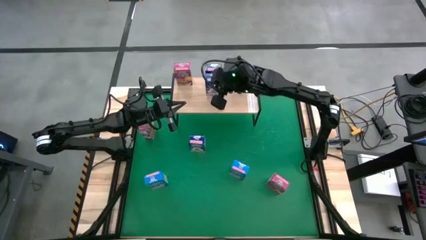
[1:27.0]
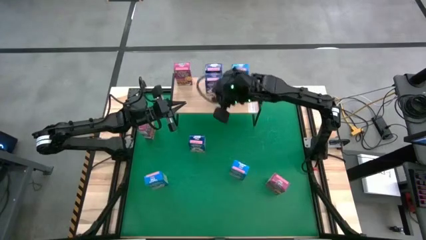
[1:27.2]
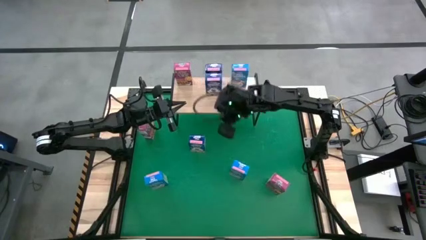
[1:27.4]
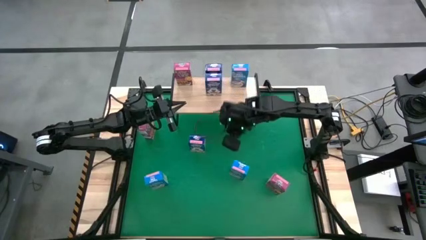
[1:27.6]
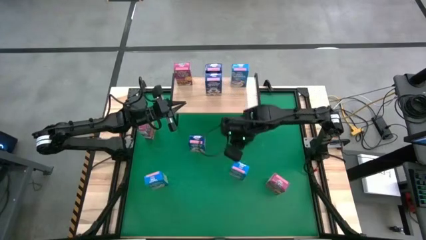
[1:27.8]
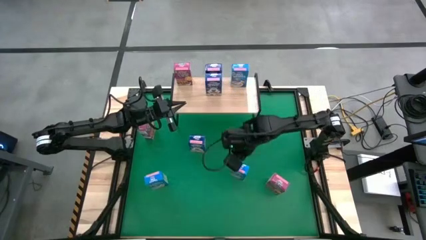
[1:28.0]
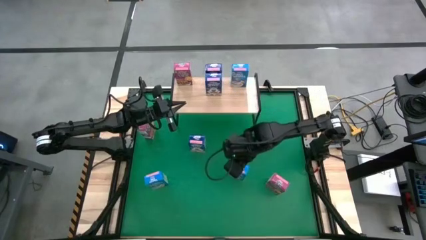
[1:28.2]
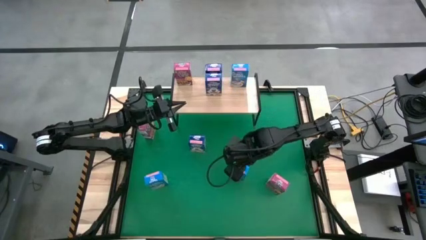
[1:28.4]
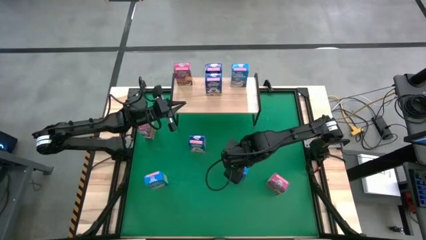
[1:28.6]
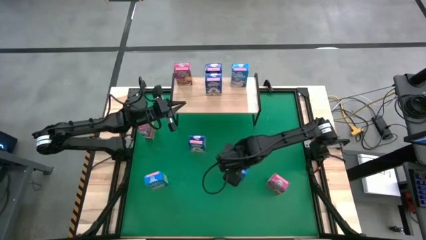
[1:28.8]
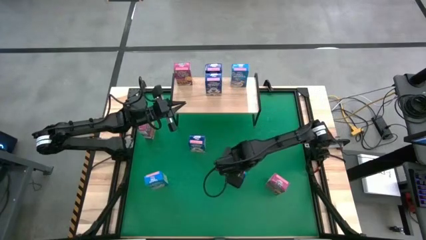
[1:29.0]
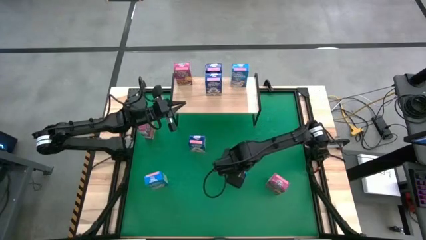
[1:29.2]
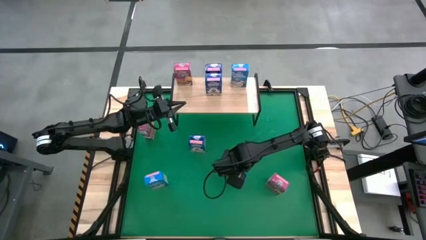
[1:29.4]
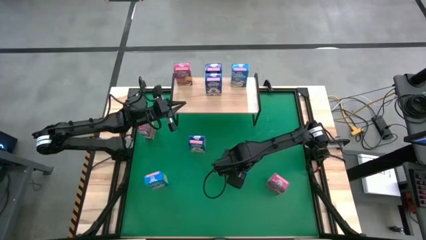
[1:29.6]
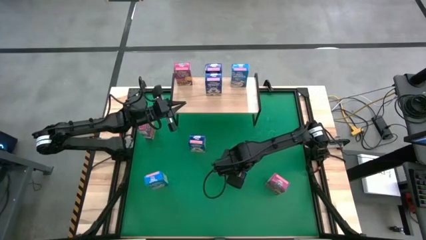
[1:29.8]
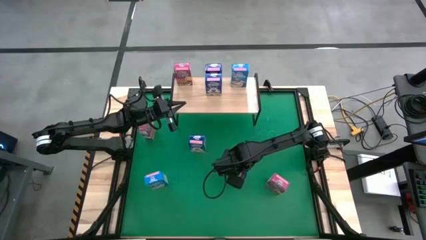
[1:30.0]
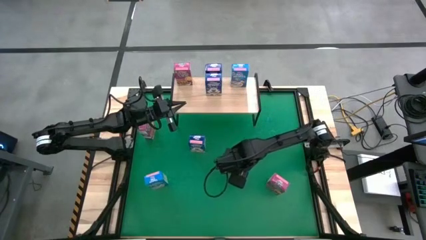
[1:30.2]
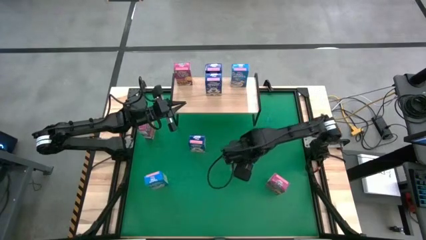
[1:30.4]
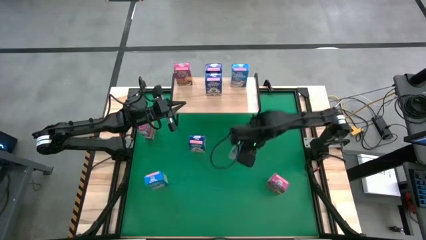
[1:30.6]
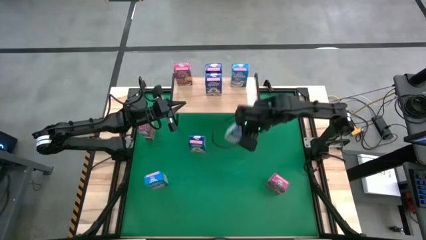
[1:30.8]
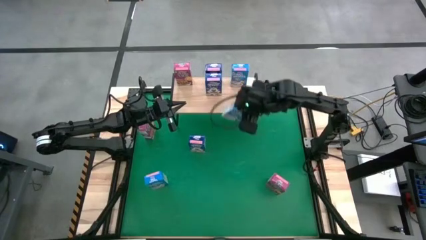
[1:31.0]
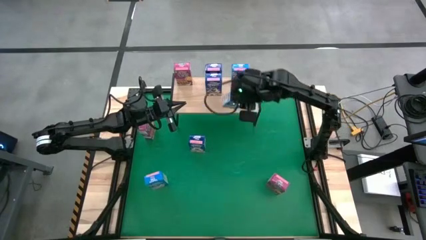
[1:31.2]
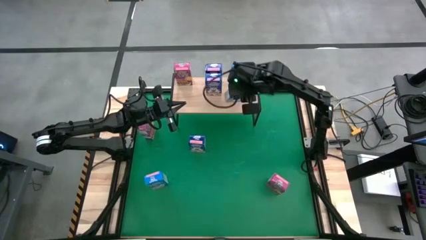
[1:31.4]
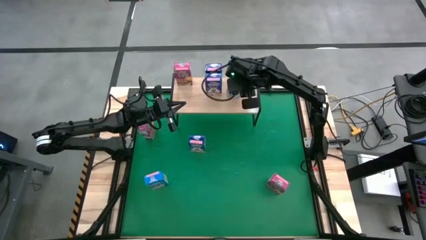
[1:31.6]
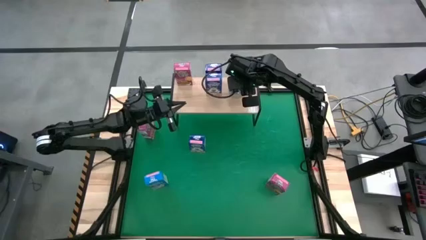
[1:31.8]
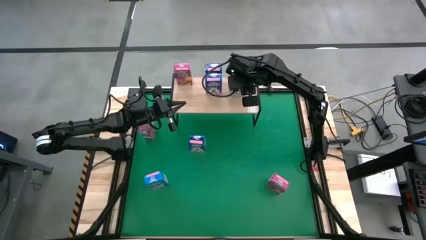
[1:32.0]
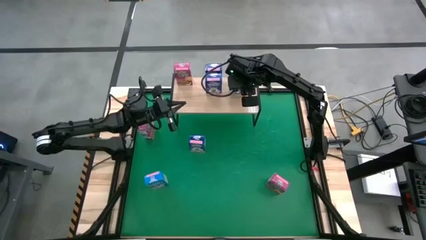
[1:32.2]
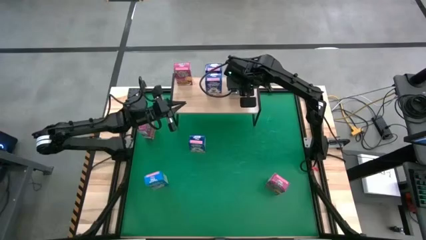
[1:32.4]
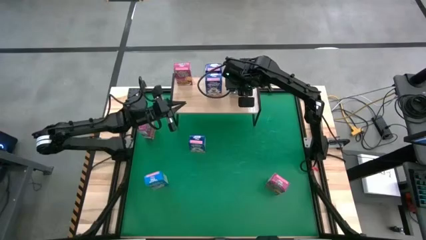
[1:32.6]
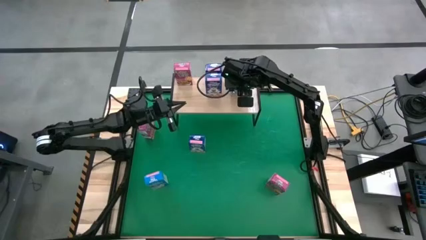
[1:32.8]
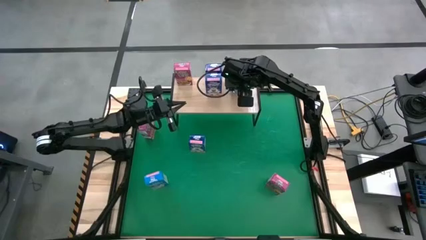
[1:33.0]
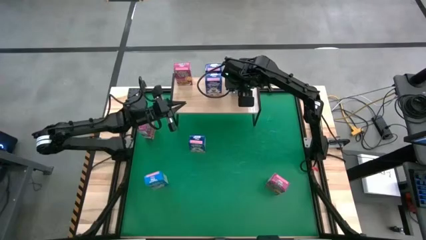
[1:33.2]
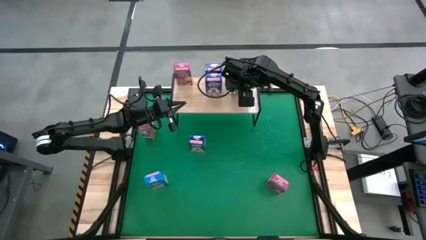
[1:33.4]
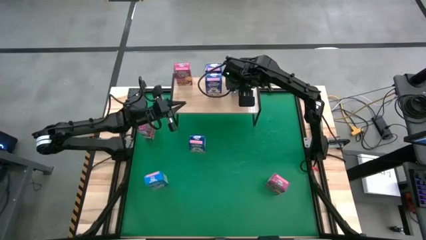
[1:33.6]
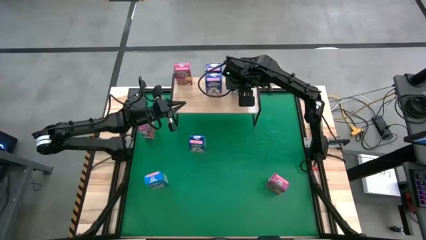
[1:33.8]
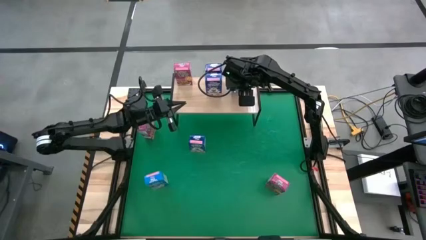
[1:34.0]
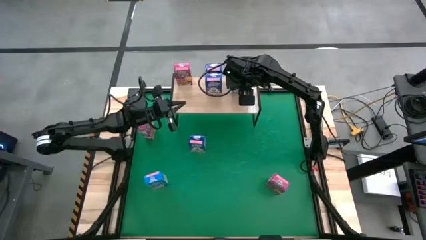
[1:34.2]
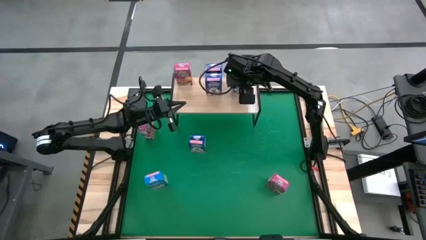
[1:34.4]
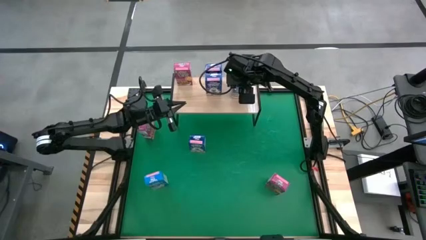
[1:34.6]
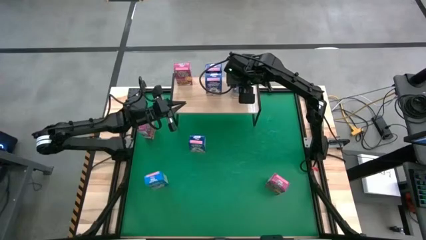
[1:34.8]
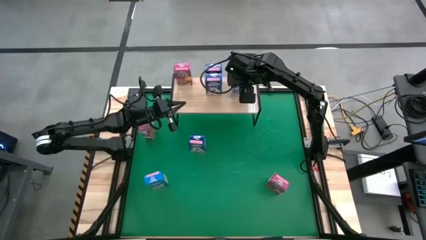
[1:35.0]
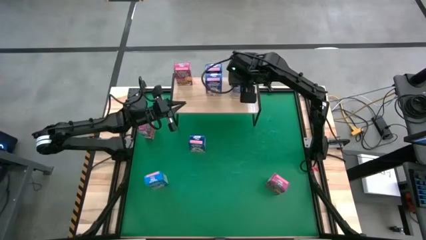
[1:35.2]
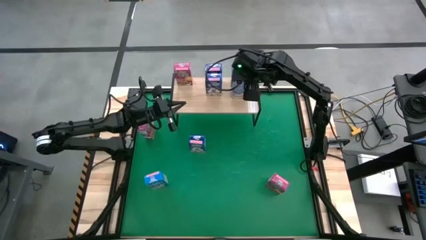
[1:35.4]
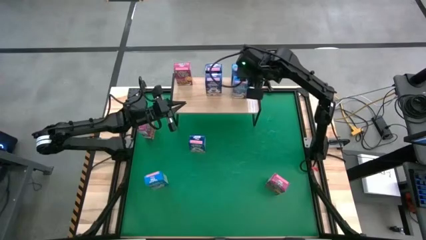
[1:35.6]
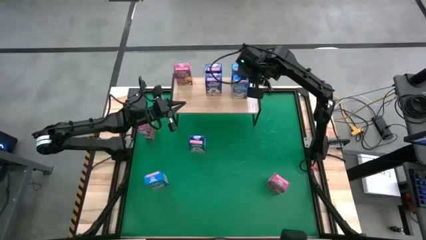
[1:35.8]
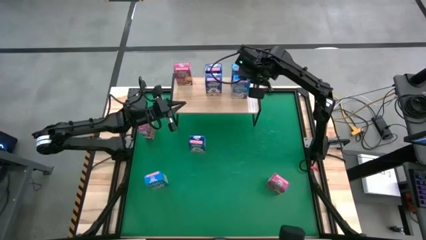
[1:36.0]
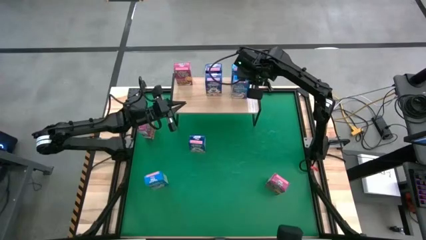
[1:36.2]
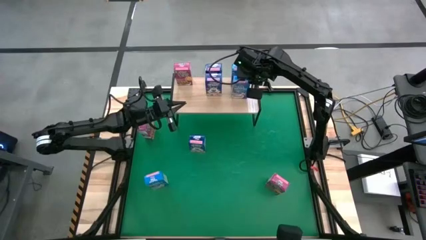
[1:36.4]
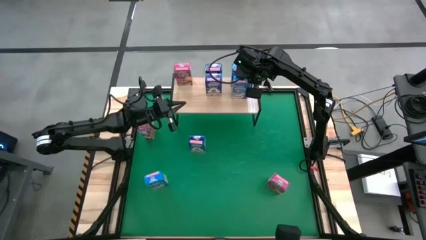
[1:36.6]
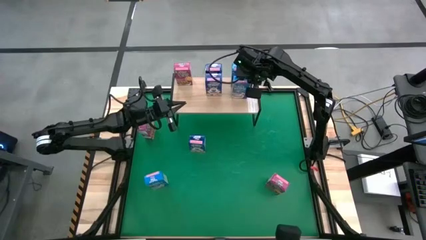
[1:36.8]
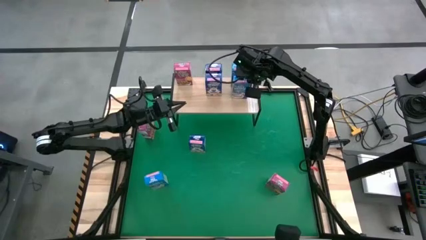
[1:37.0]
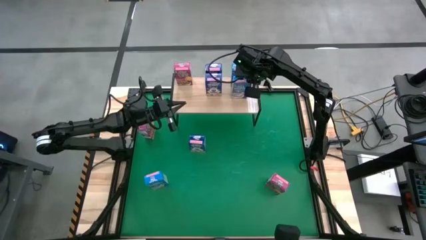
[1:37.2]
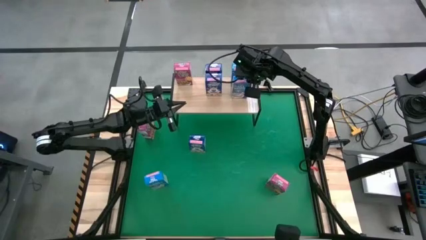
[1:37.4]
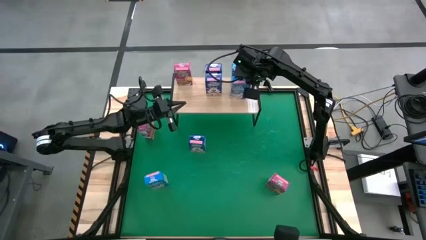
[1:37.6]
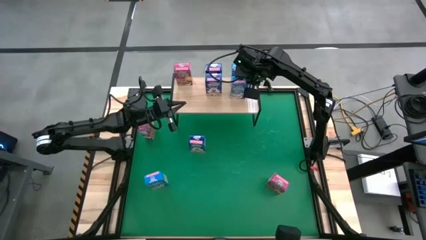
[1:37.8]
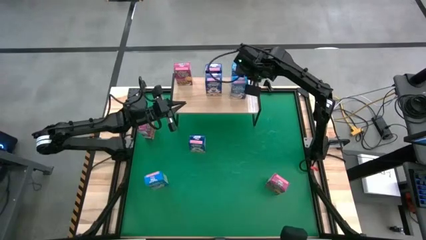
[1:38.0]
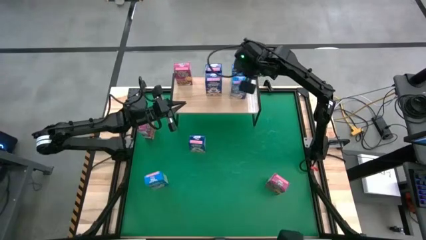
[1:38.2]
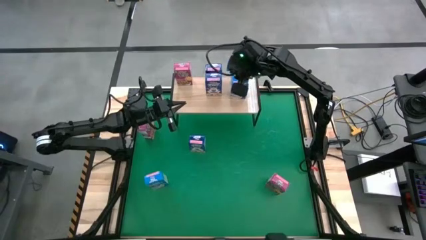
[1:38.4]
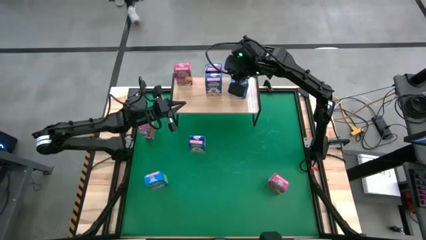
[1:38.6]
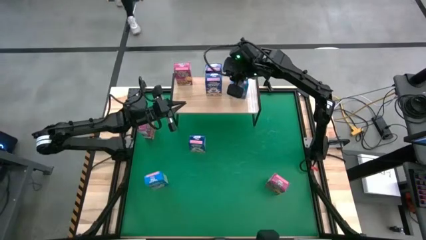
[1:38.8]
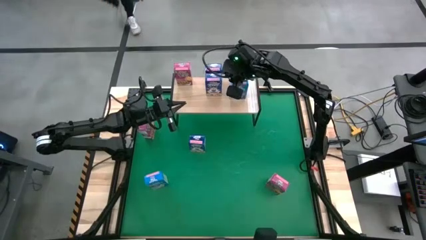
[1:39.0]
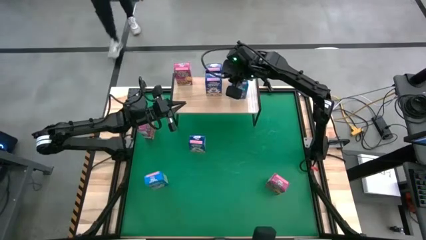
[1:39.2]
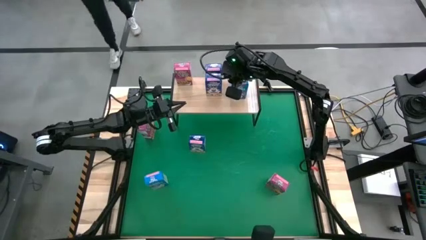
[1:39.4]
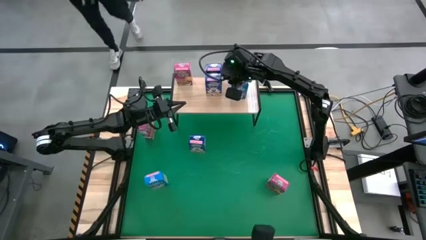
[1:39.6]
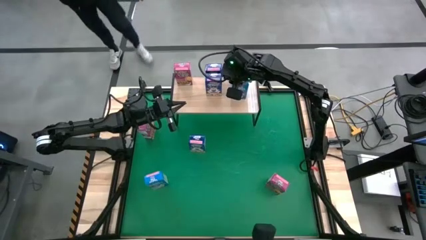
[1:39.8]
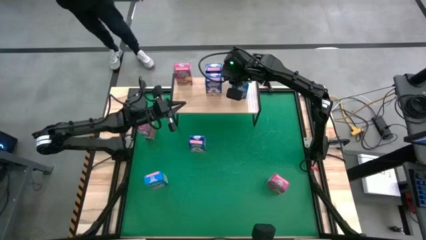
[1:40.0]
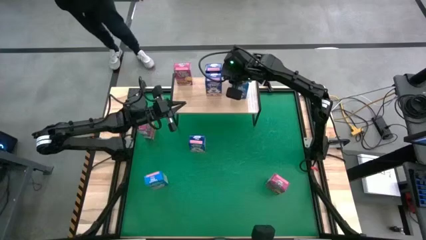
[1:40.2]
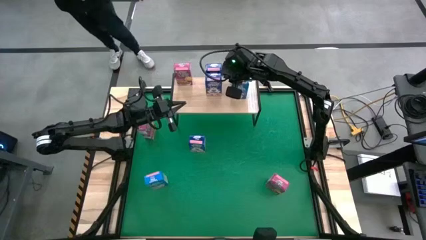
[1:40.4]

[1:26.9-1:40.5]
Task: Stack cereal on shelf
Put the right light blue cereal box on the shelf aligned with the other light blue cereal box

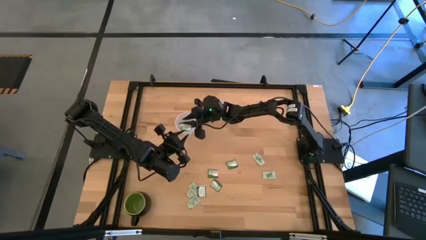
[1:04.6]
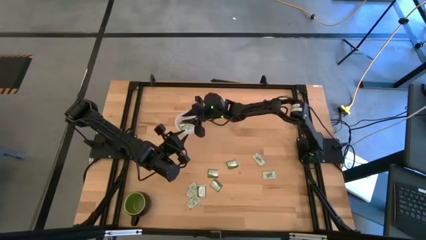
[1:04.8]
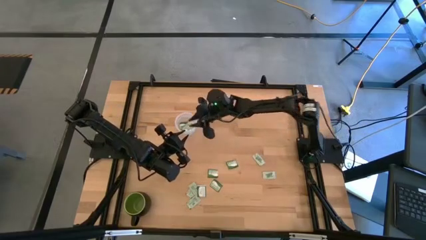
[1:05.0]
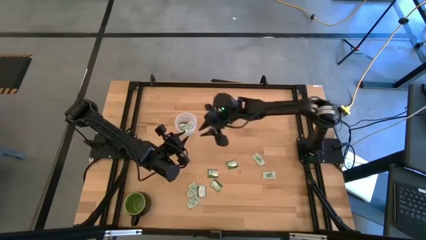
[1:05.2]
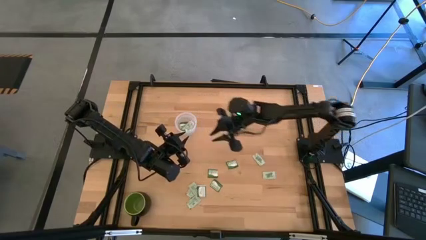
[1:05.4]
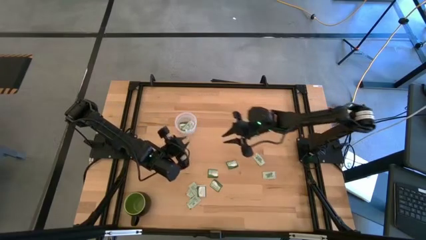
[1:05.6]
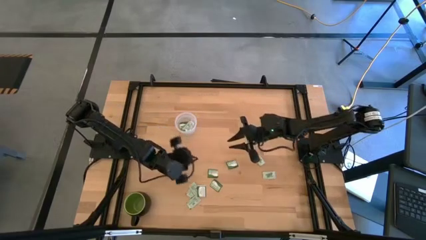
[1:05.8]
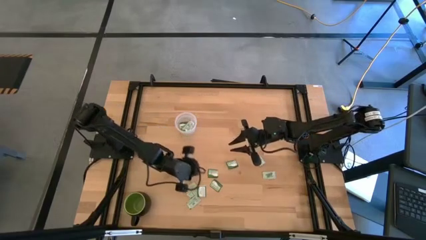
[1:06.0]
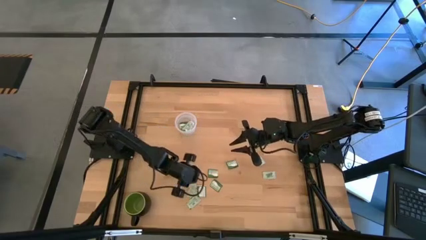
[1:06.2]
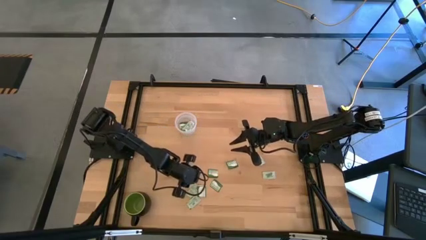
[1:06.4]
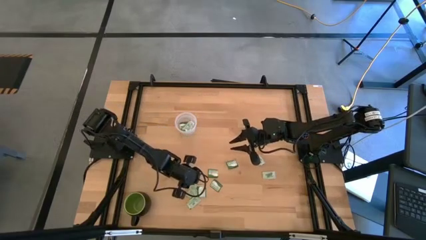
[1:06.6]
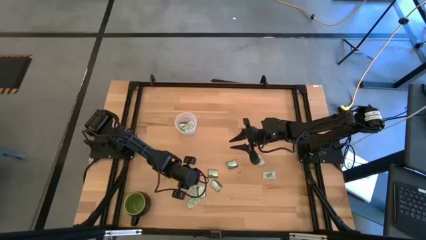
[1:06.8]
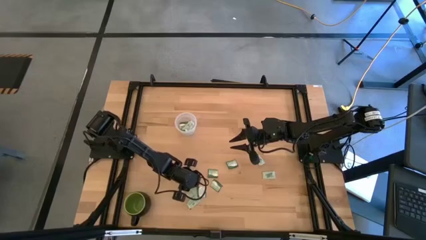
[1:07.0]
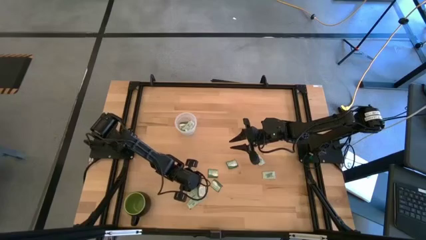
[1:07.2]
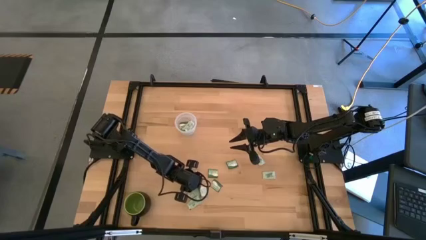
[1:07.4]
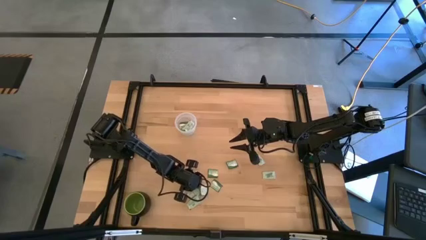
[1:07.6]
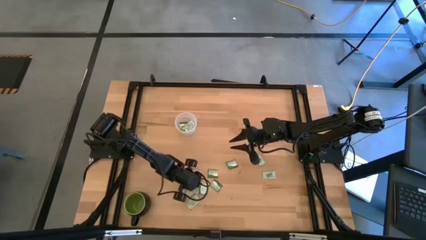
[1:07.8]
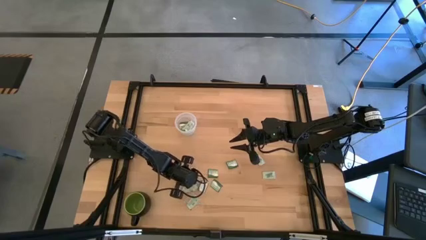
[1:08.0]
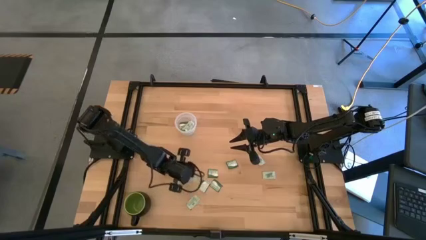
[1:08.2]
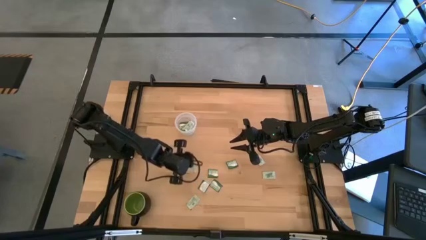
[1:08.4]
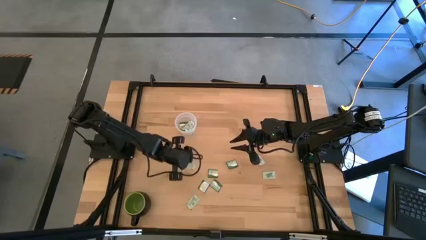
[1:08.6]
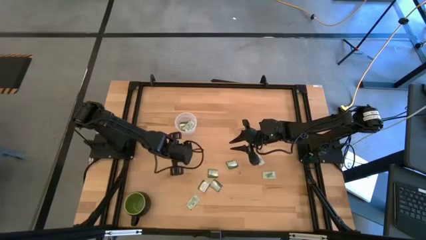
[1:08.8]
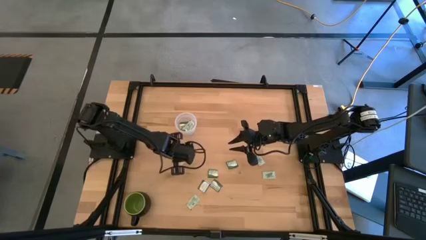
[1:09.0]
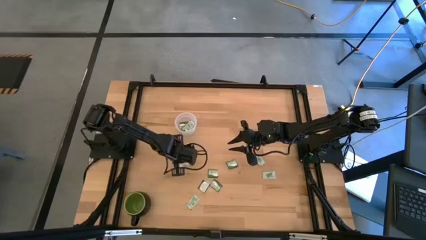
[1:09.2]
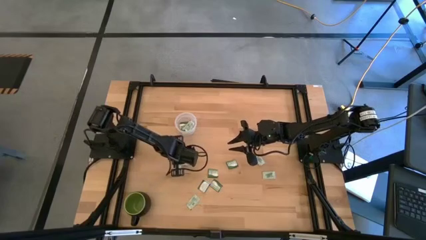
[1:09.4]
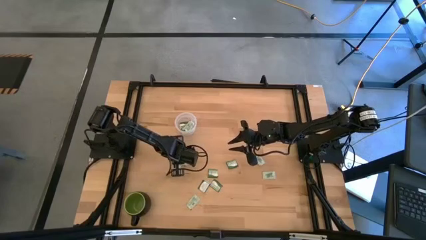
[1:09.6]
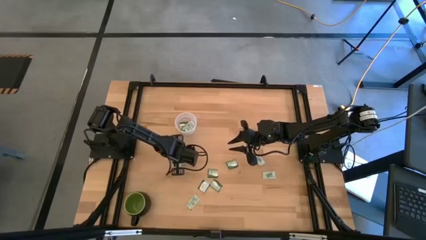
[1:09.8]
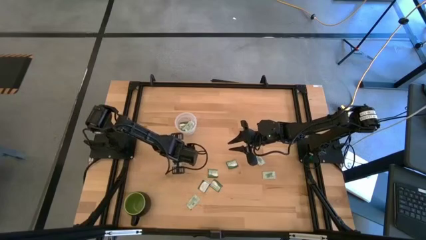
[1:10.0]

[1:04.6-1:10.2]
Task: Pick and place Stevia / Truvia into bins
Put the light green stevia packet into the transparent container
